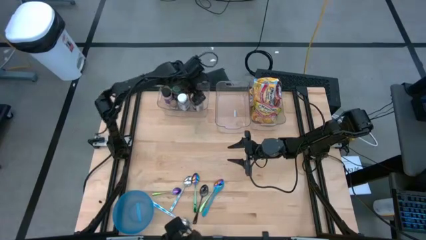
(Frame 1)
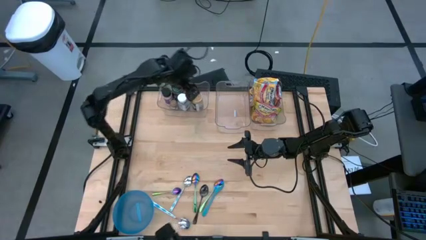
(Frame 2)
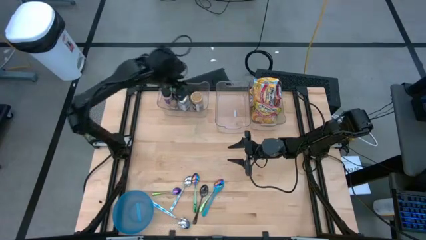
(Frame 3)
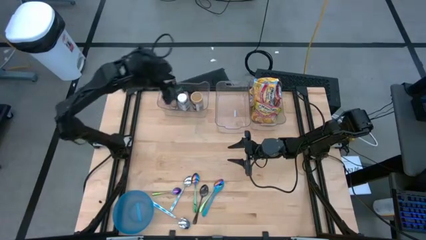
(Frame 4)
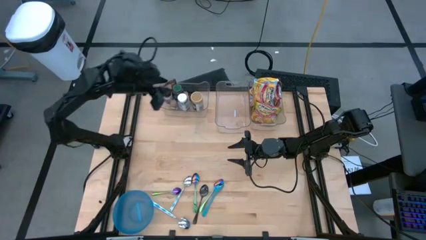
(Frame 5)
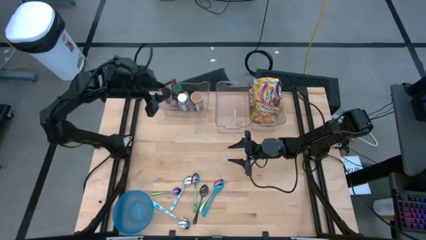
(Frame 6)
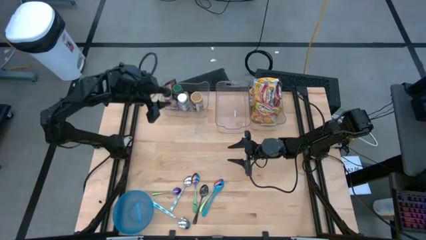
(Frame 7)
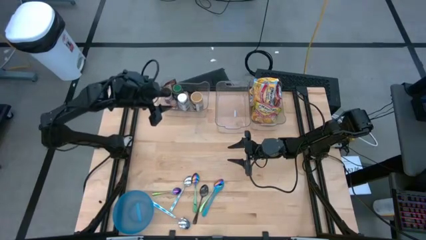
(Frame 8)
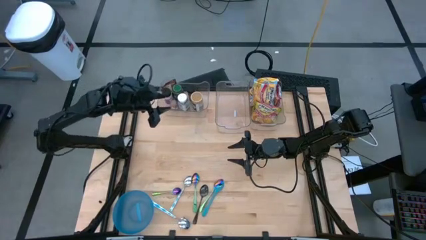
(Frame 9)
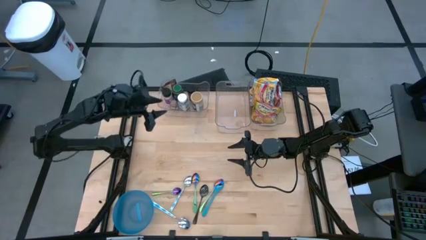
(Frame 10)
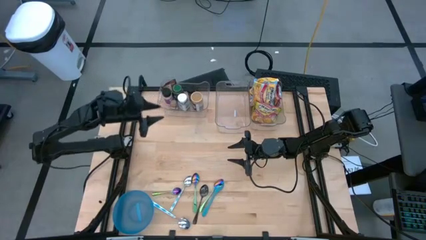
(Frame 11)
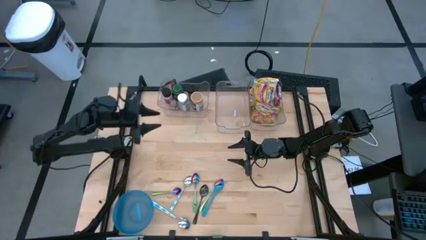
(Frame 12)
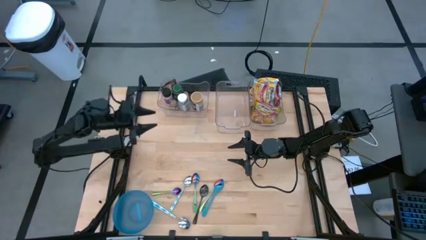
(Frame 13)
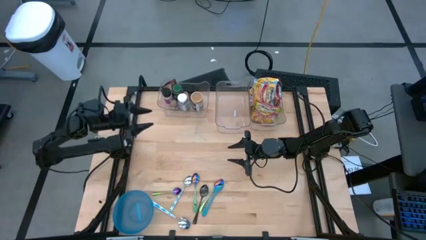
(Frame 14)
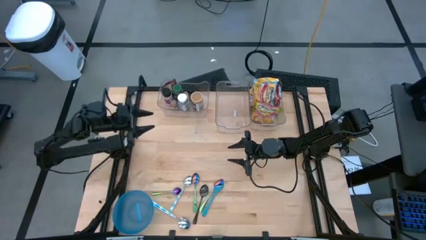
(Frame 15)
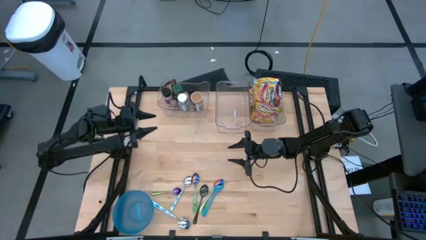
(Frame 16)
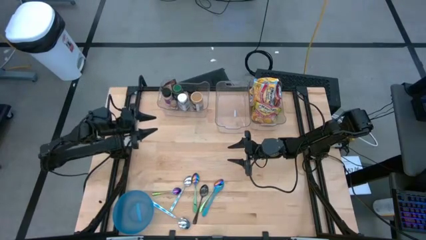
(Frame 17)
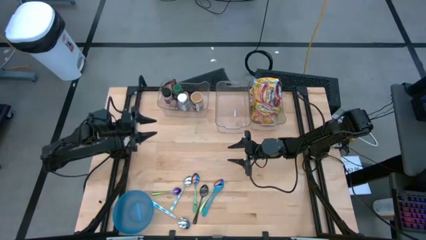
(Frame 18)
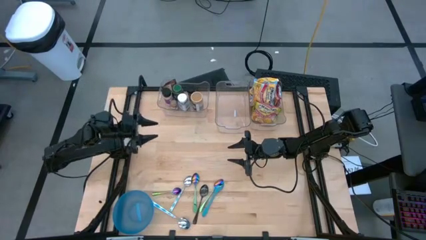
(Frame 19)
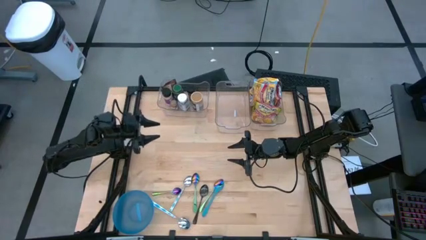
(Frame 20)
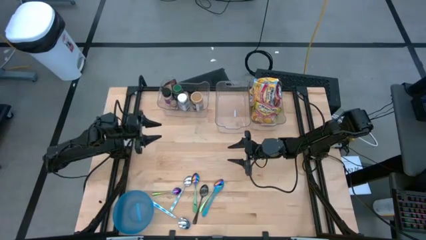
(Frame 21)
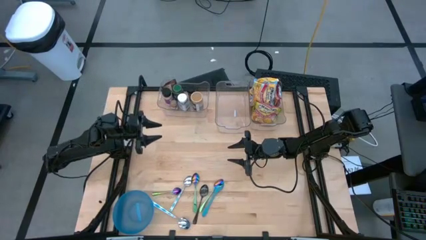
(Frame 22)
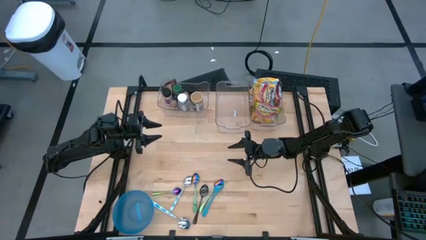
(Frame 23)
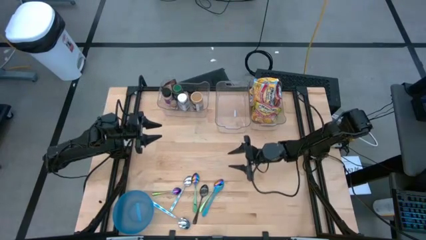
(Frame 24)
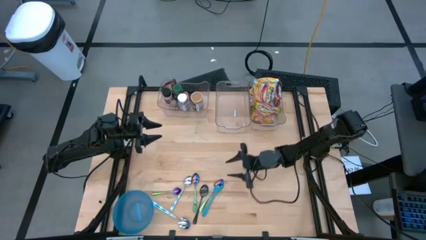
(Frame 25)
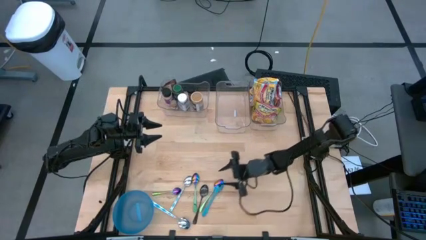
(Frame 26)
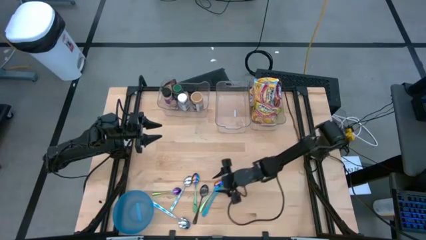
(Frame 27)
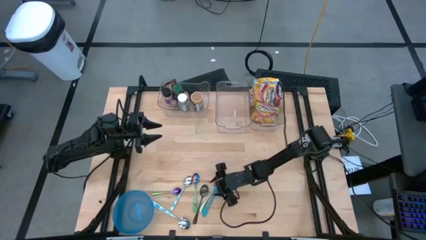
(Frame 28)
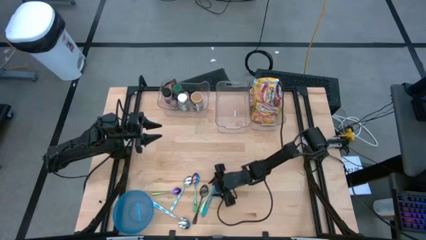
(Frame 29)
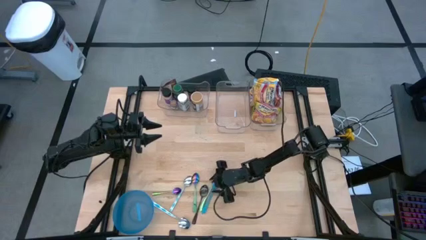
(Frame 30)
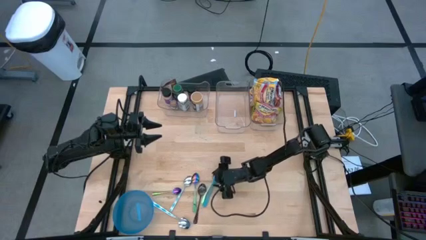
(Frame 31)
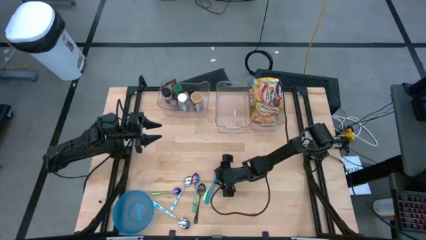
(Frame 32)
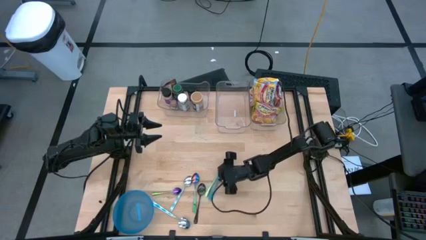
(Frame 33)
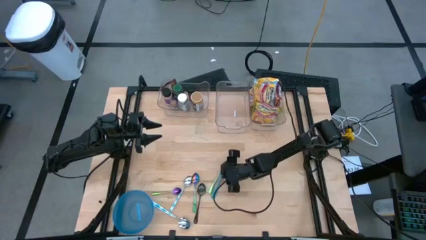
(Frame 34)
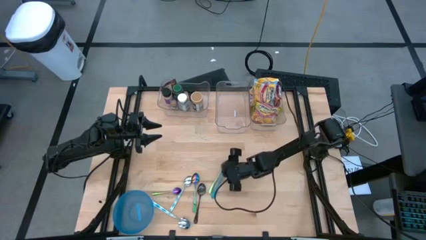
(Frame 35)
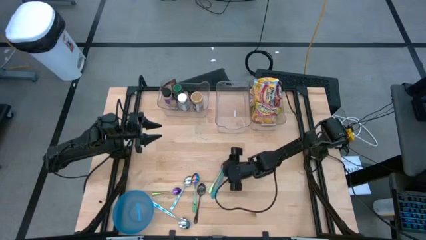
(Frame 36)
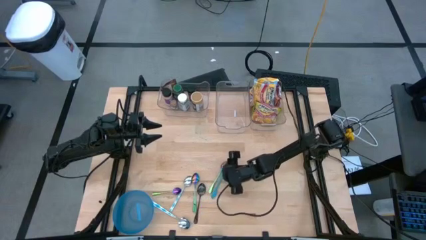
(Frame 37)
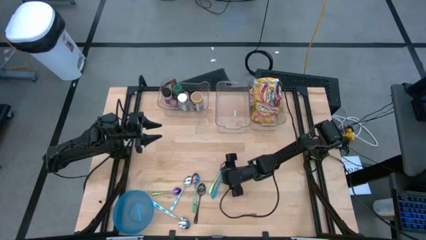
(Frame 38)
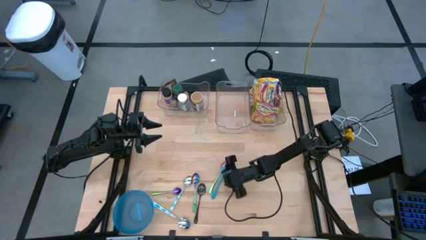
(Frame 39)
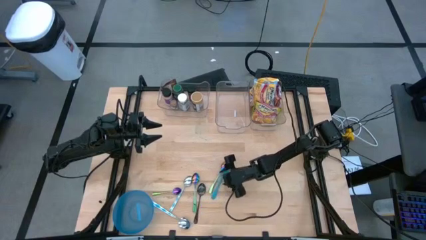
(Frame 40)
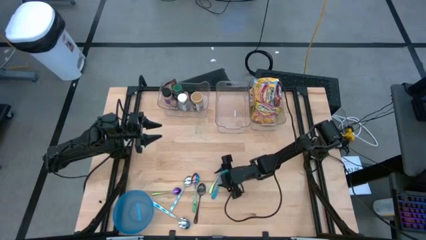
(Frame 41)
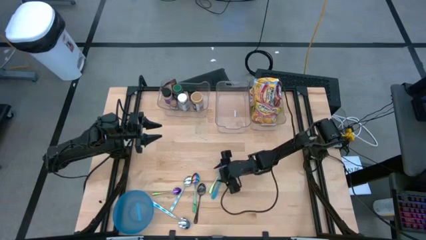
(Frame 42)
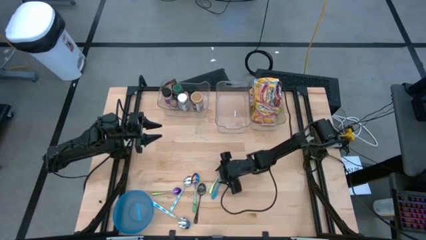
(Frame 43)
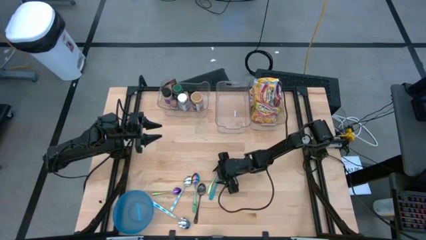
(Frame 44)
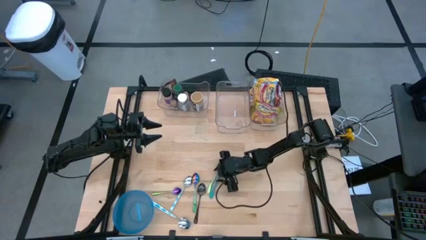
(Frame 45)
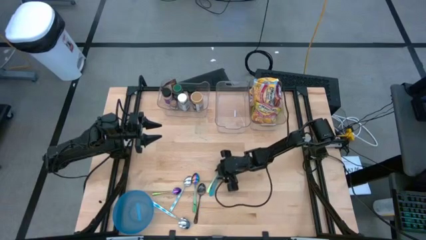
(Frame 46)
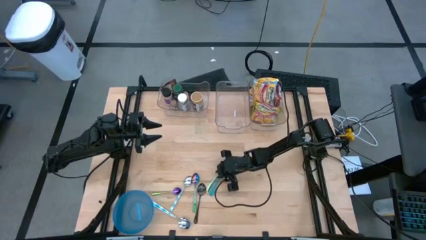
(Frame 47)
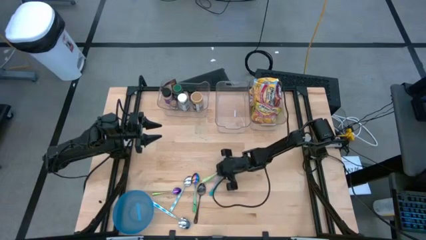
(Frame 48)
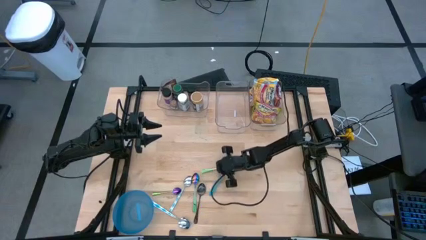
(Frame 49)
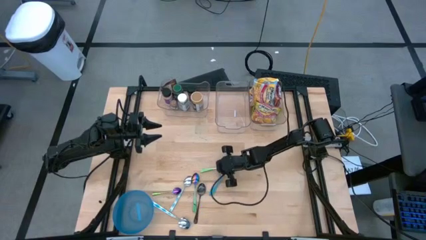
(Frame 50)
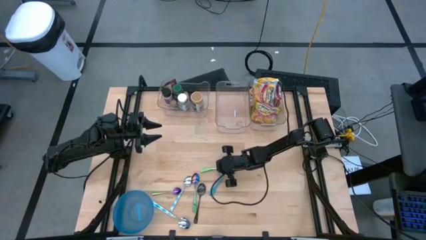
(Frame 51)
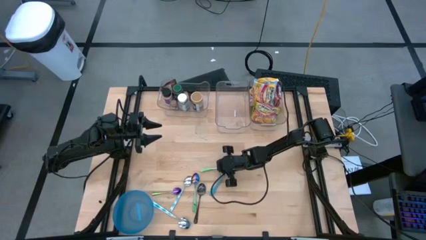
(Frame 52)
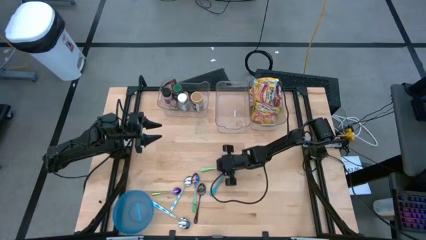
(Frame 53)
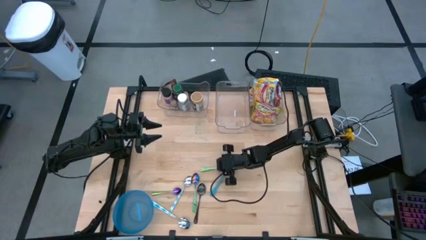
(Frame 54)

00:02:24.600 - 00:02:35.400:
Task: Pick & Place Food Item
Put the blue spoon into the middle transparent bin

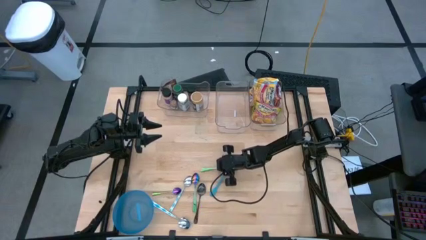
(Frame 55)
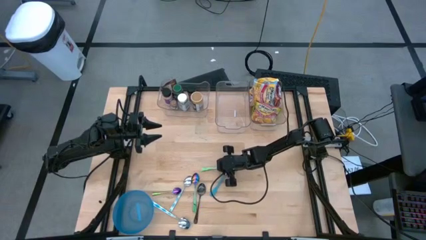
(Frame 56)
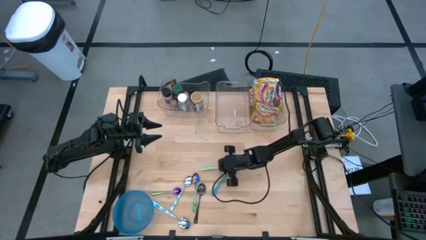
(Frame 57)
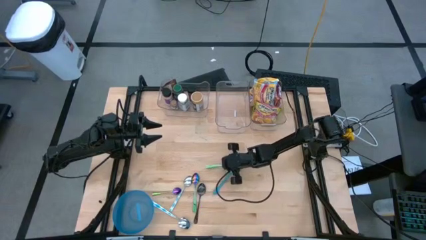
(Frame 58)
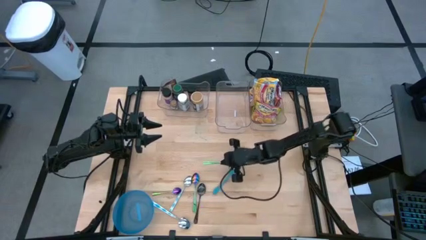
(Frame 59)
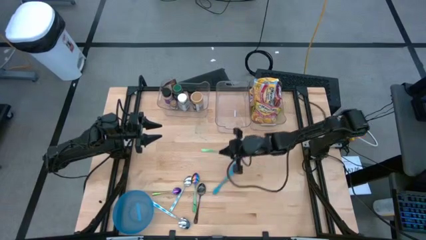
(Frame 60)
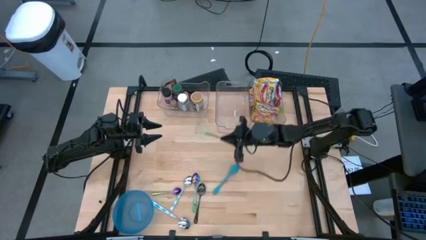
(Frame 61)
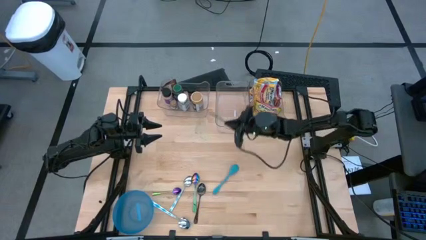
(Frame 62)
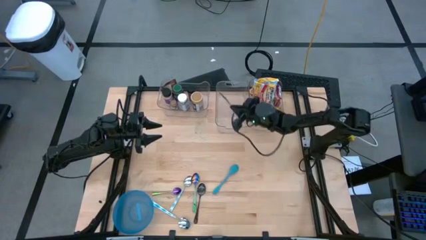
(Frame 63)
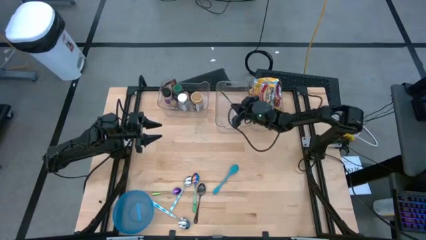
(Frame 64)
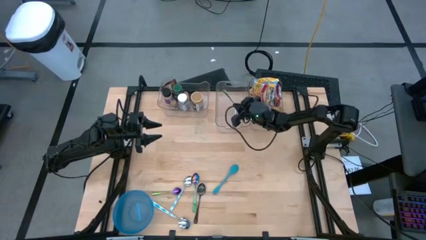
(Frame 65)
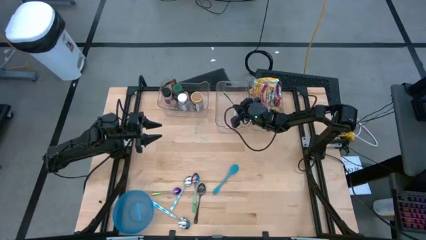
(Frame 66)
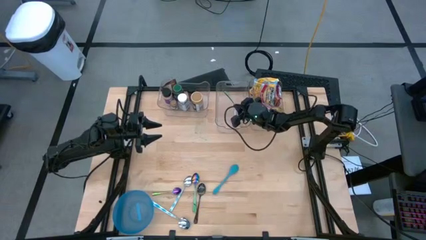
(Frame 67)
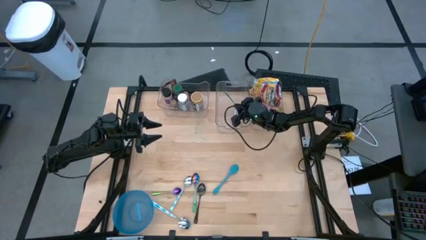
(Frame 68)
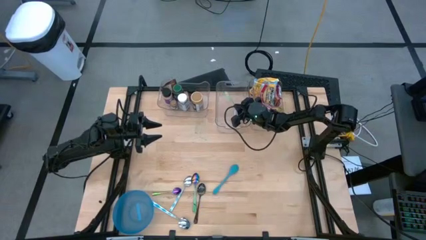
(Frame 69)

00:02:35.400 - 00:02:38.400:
Put the purple spoon into the middle transparent bin

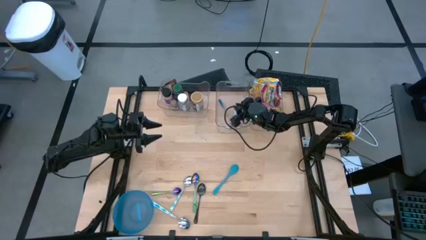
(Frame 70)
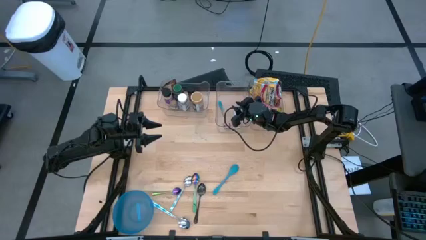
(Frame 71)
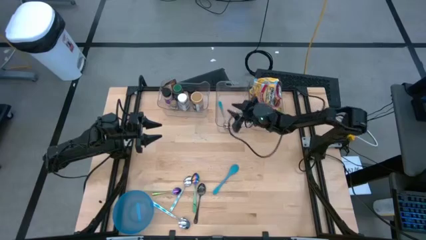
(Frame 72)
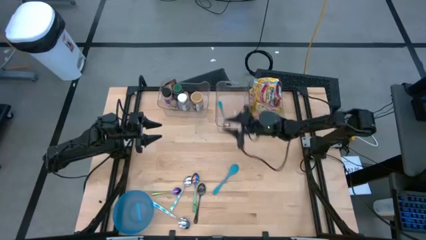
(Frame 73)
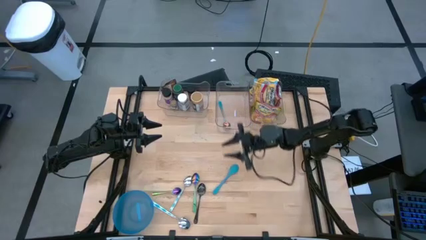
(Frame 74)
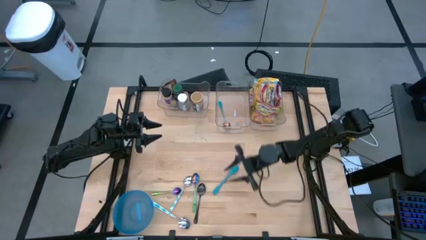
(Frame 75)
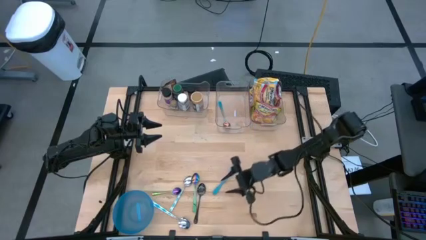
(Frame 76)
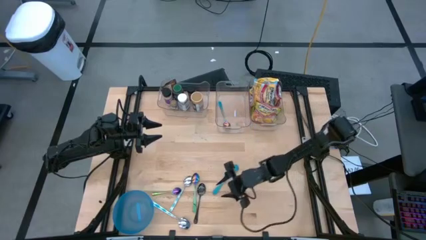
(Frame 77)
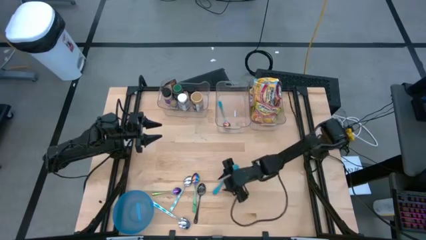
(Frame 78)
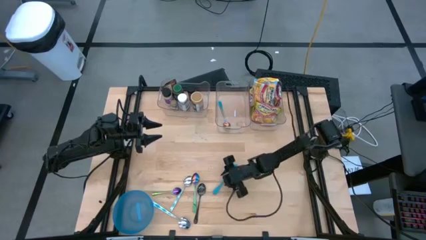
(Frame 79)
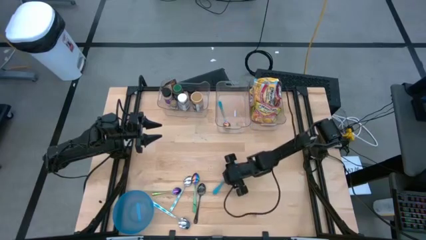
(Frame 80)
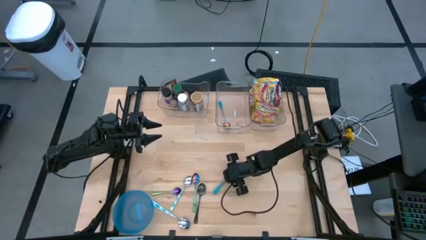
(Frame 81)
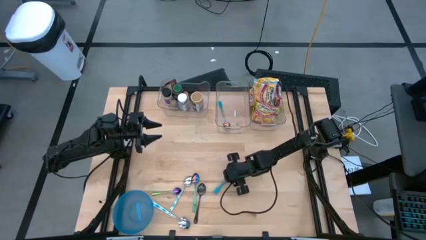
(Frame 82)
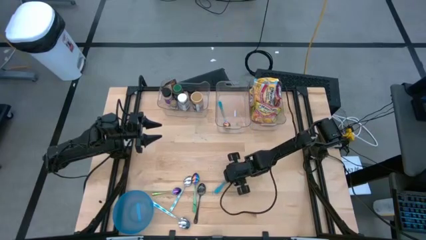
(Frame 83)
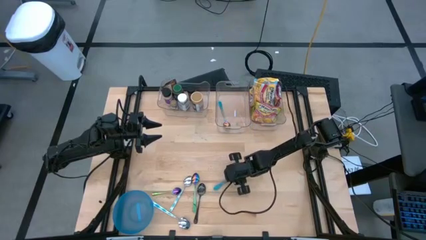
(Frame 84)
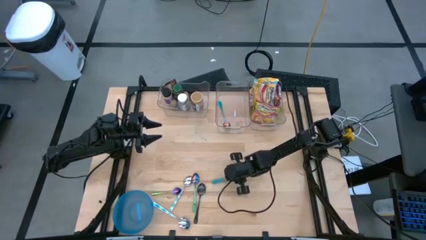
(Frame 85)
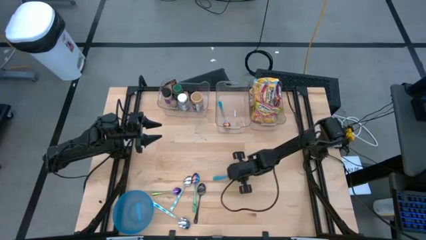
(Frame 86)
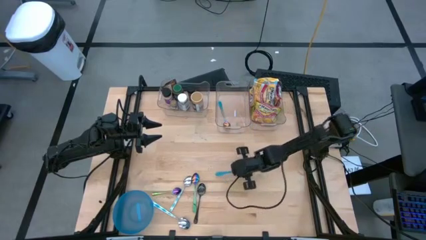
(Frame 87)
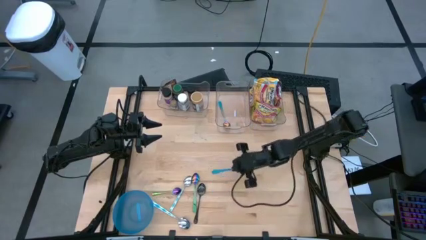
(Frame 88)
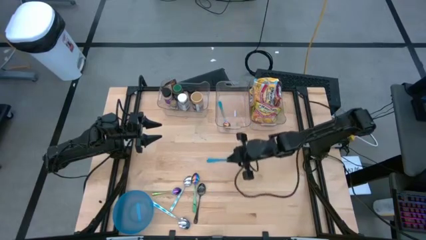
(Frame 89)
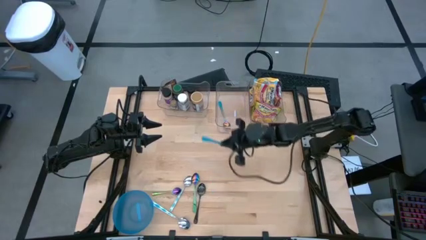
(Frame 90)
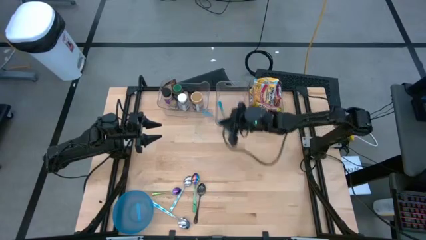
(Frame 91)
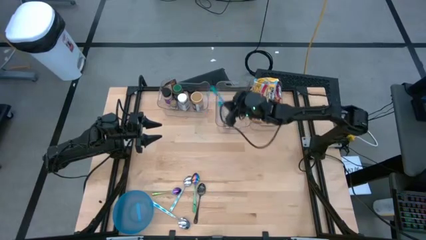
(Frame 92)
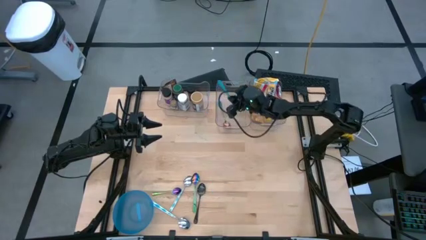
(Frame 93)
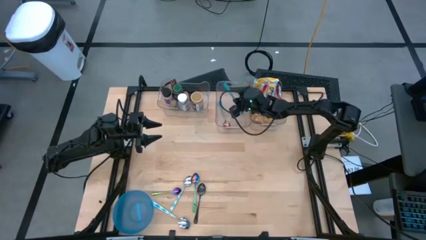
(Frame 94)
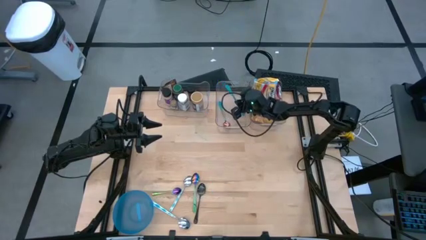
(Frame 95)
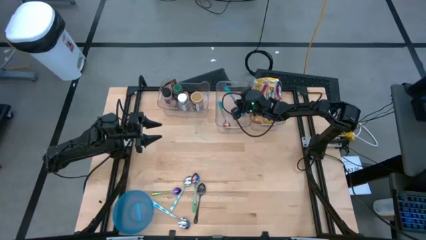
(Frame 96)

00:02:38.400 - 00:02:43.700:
Put the blue baby spoon into the middle transparent bin
